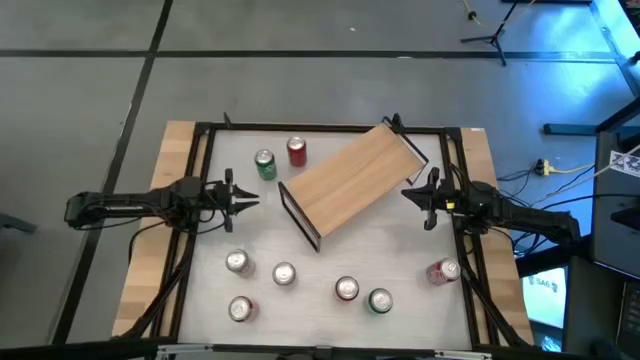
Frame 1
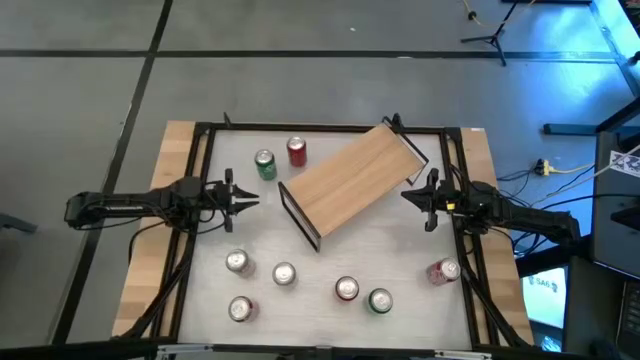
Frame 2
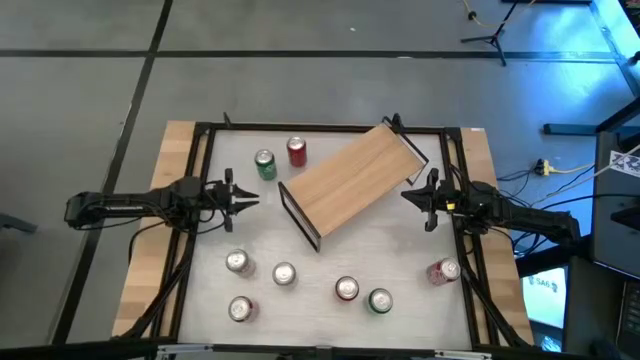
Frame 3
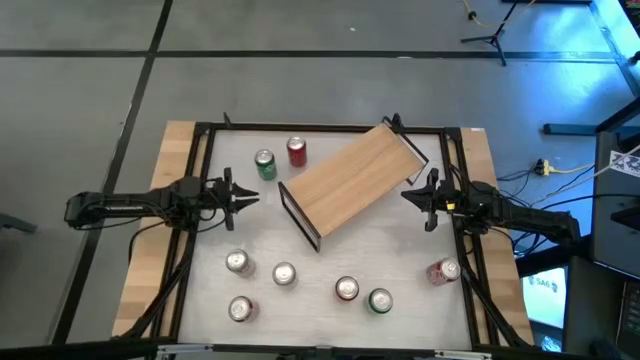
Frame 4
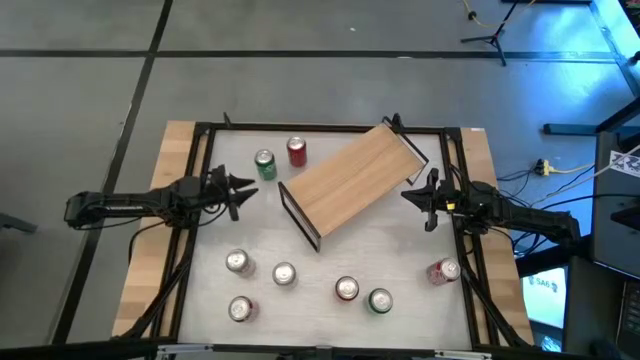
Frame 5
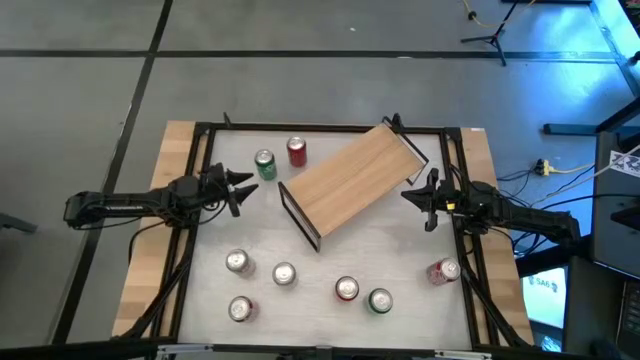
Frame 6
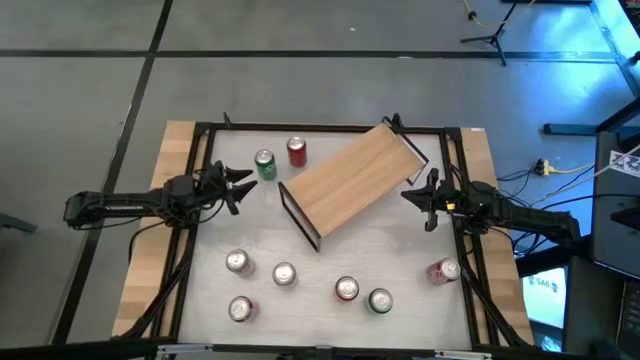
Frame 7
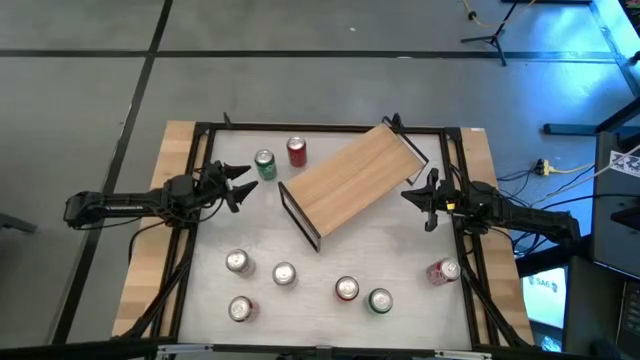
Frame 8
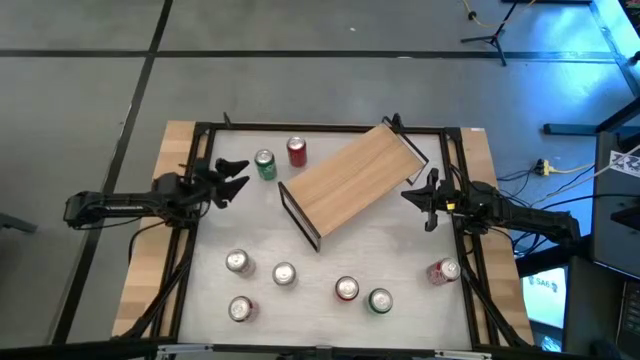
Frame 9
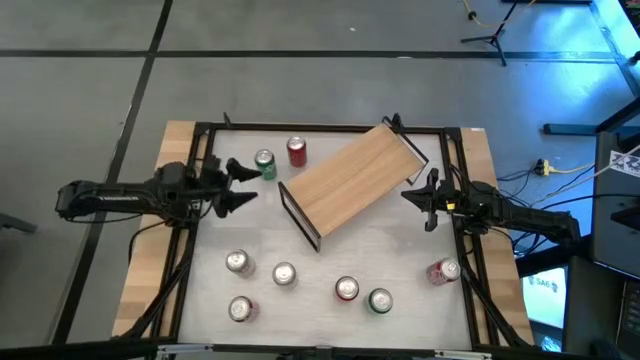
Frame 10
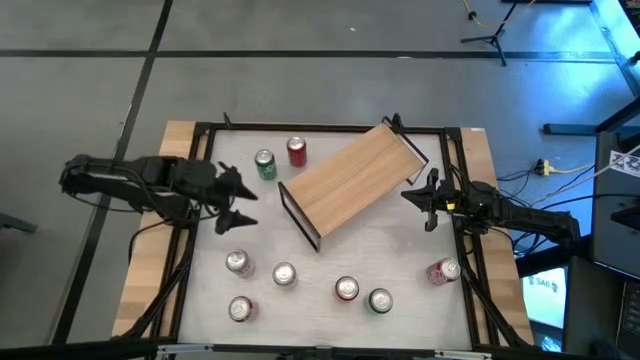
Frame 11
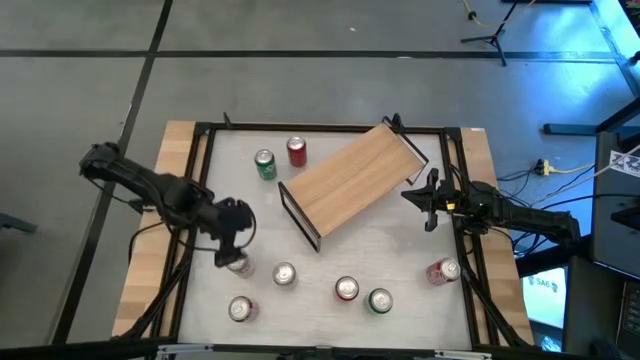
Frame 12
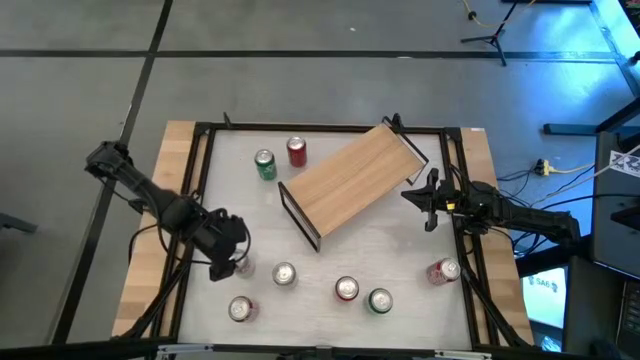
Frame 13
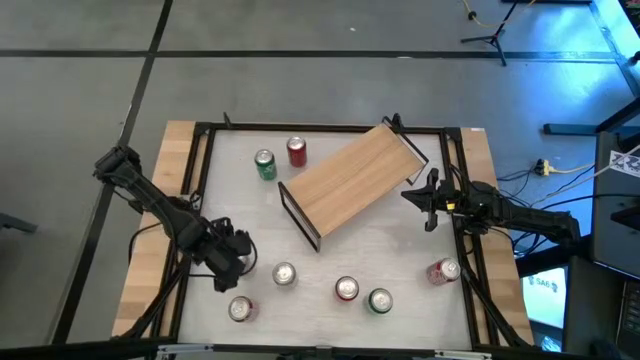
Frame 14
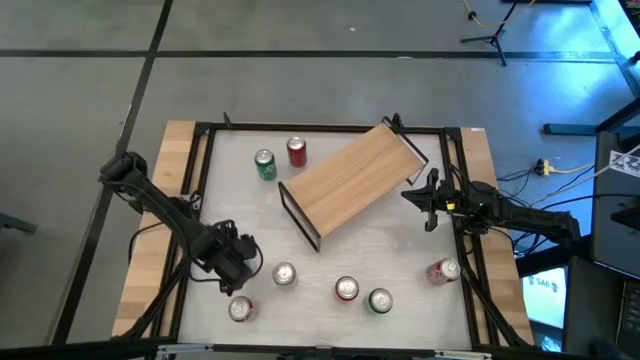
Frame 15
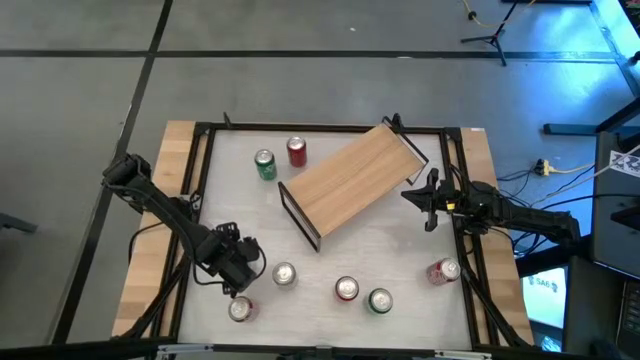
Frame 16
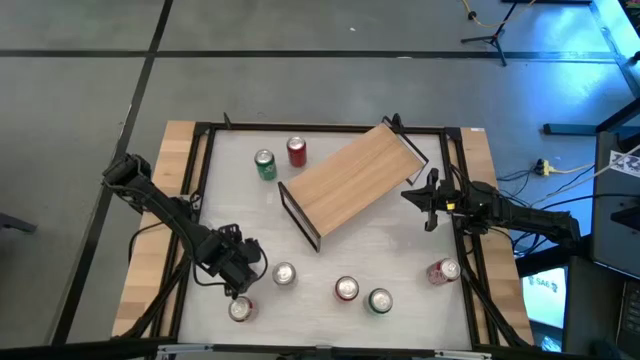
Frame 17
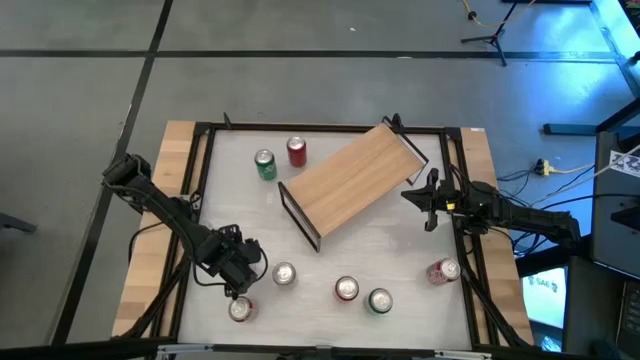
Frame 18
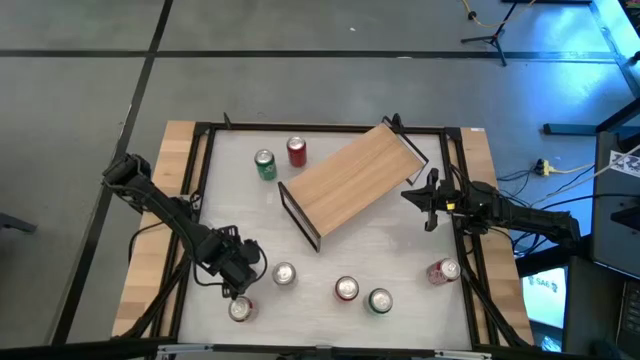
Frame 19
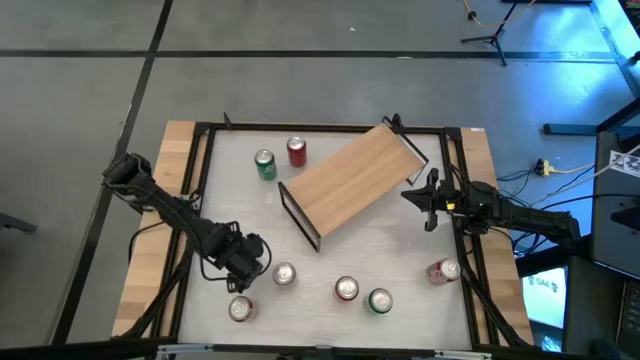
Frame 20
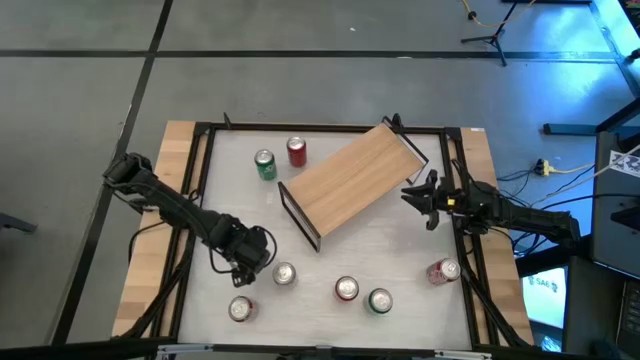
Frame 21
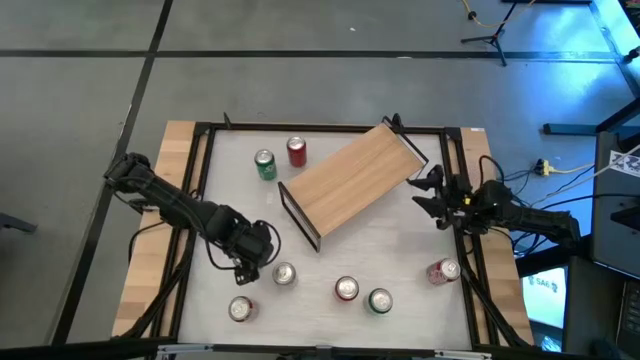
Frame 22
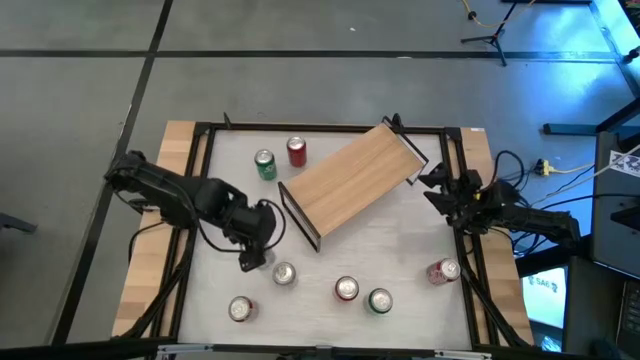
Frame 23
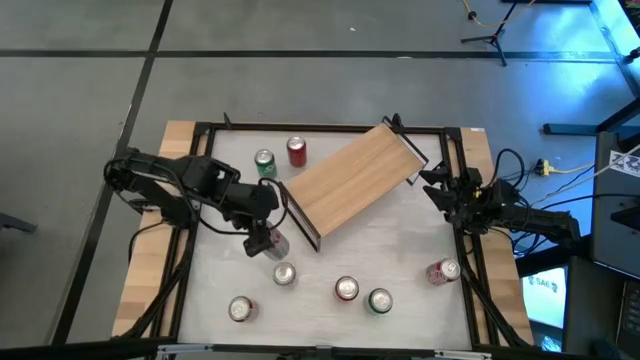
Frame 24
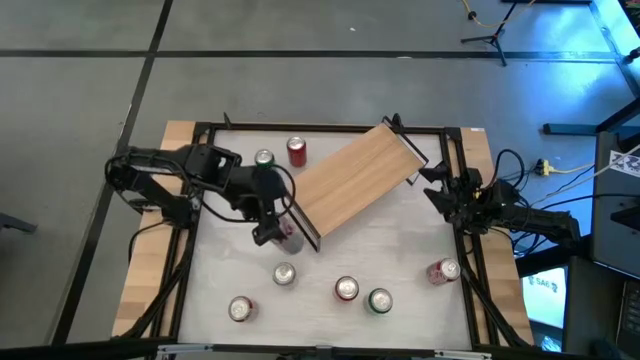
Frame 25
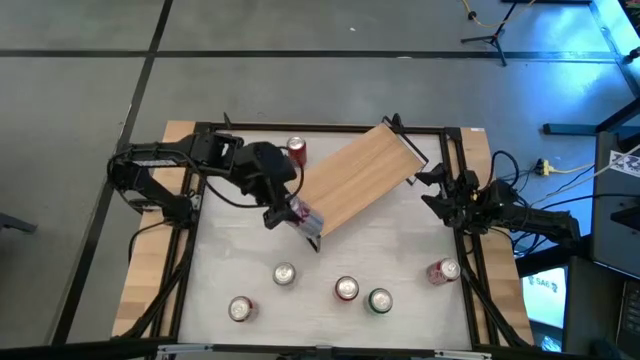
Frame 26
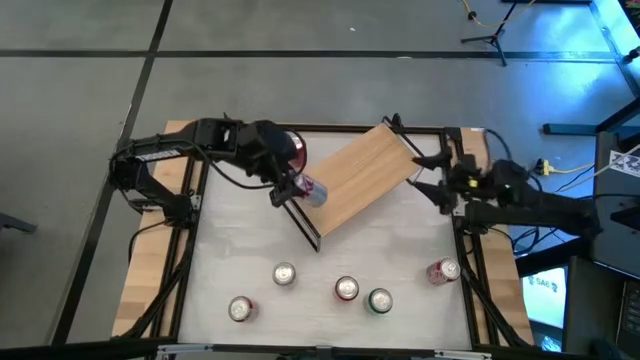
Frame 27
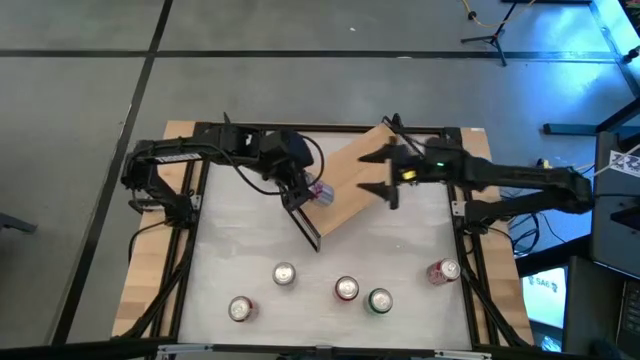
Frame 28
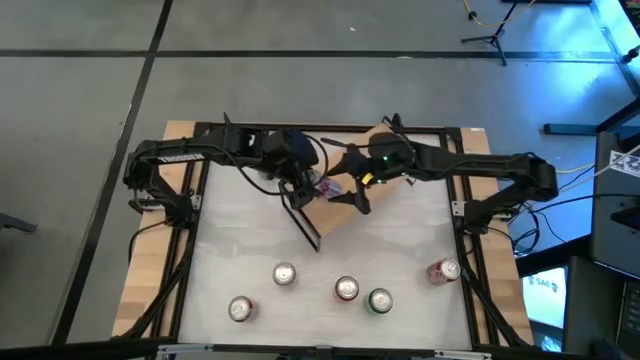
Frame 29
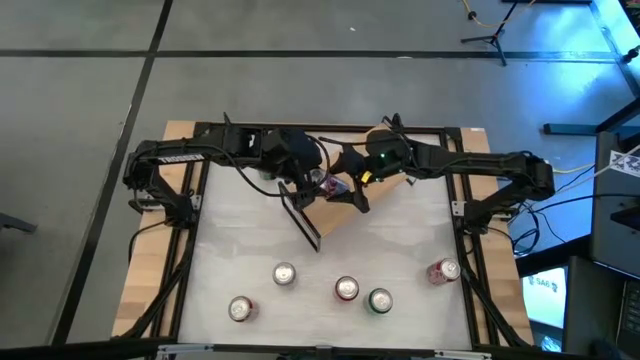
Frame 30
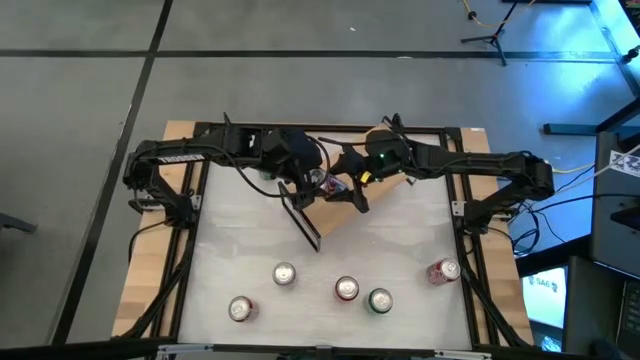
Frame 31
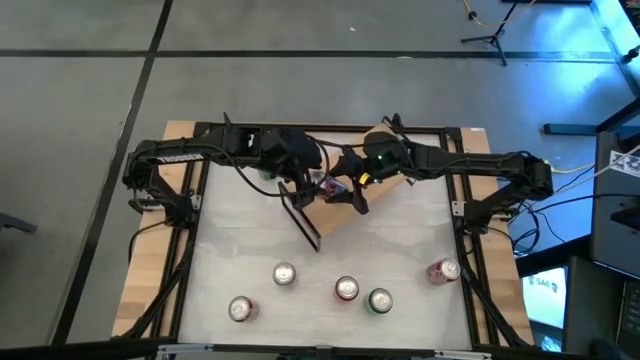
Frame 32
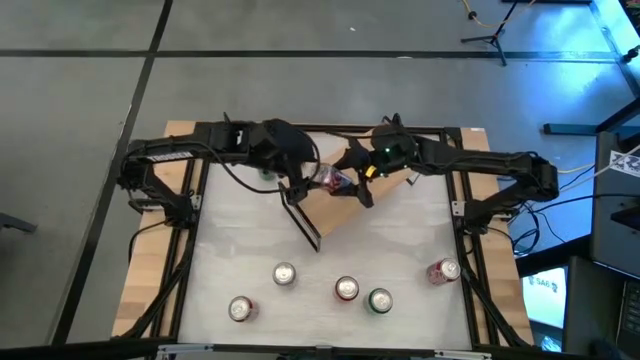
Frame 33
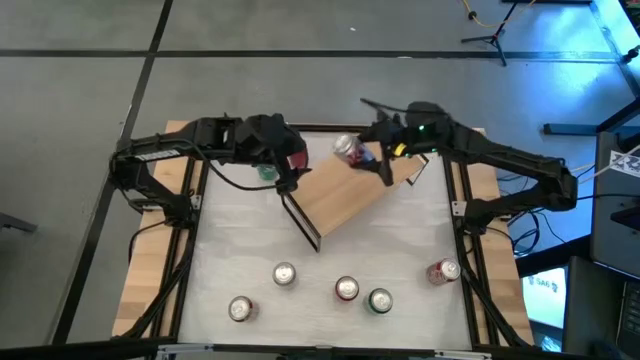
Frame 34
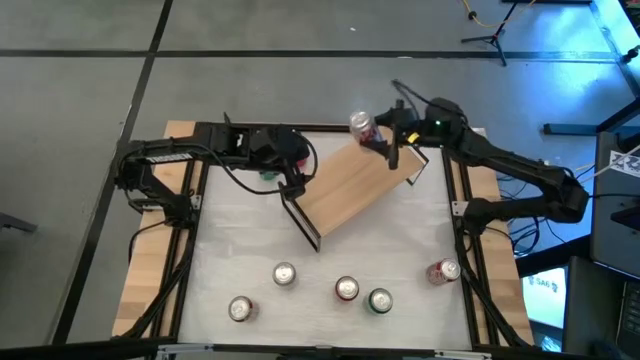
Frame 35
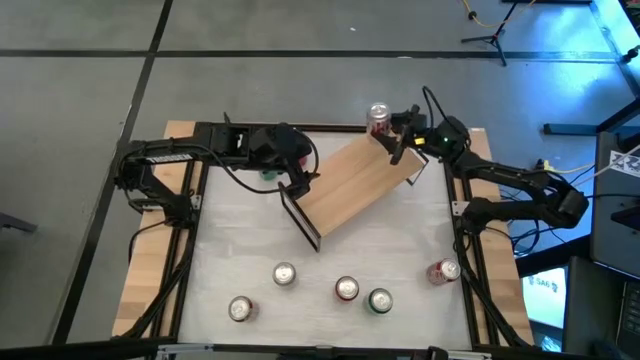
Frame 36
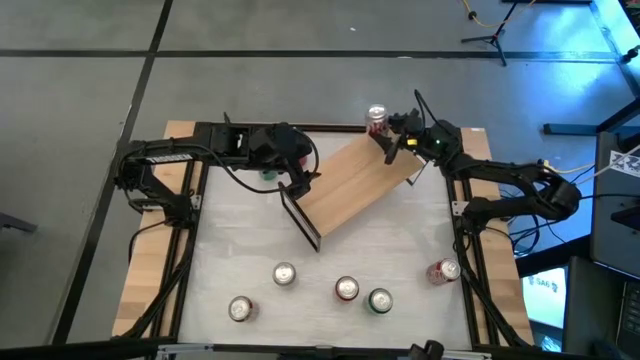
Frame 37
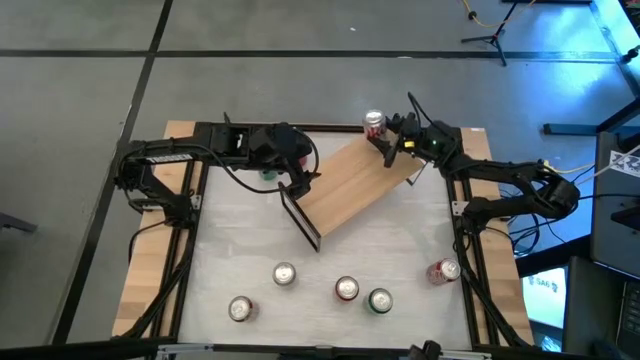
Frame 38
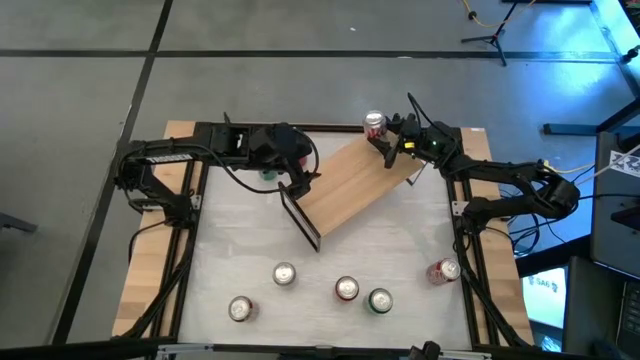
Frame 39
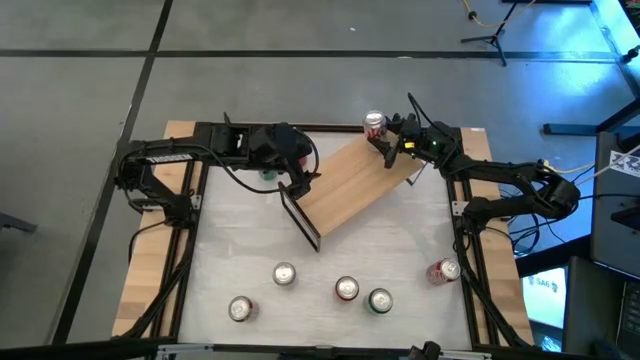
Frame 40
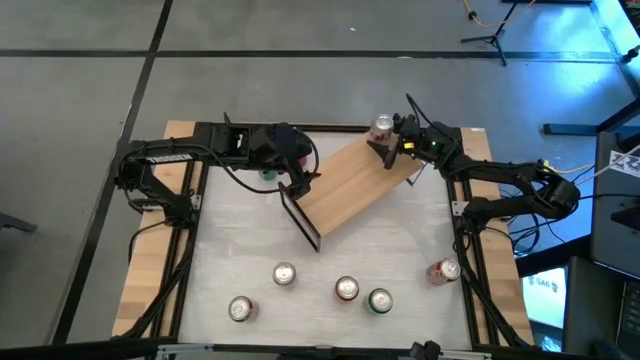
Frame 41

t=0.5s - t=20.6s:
Task: Place canned beverage on shelf
Put the left silver soda can on the shelf
